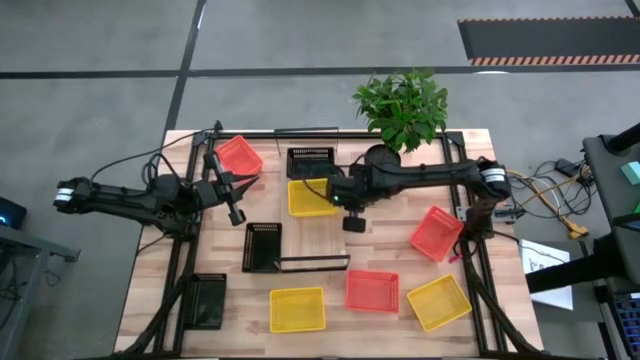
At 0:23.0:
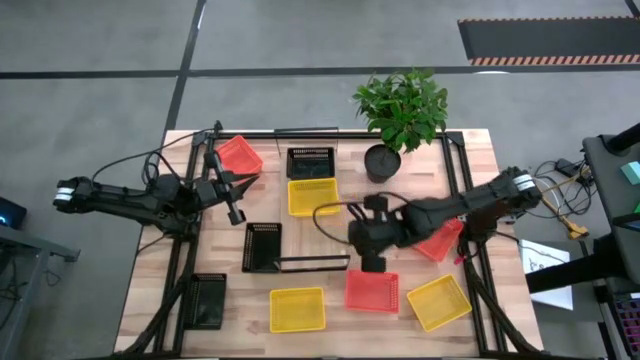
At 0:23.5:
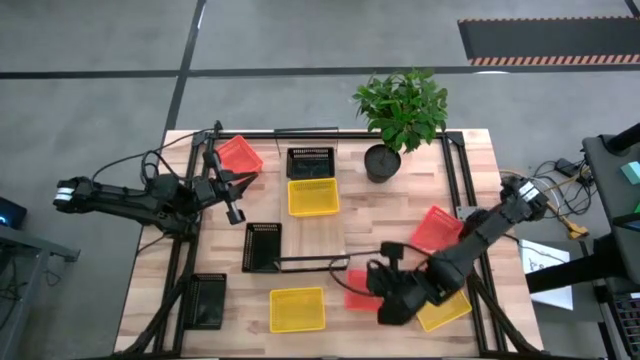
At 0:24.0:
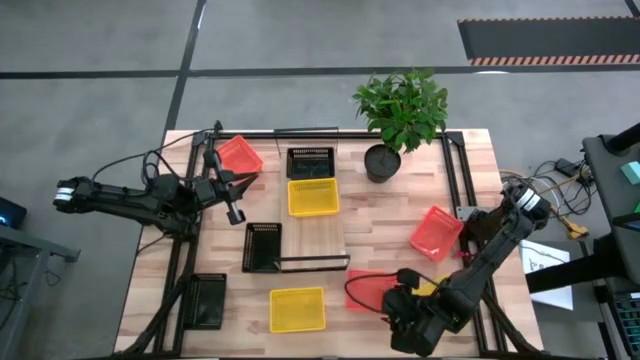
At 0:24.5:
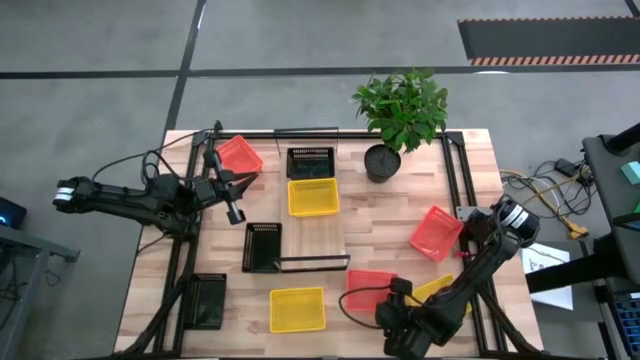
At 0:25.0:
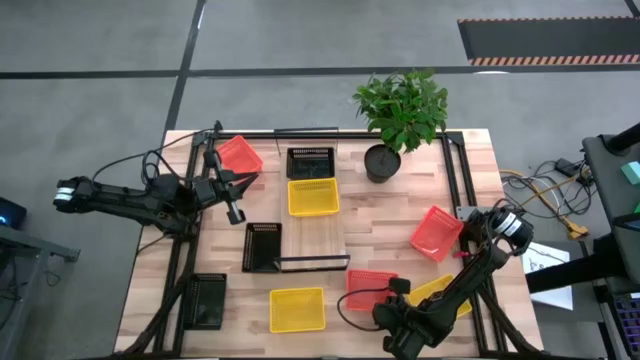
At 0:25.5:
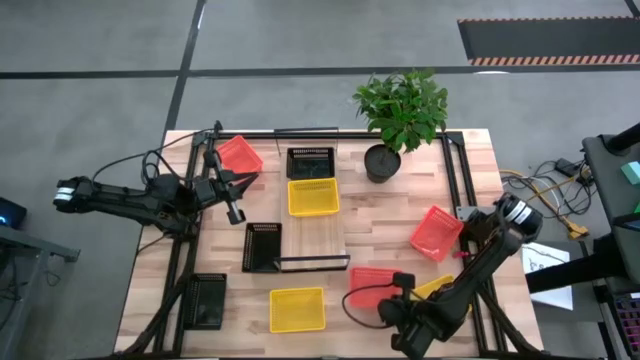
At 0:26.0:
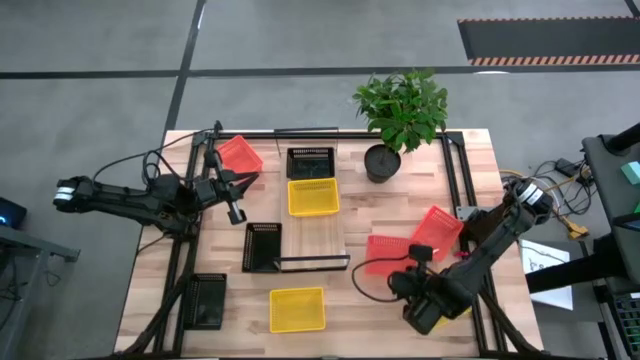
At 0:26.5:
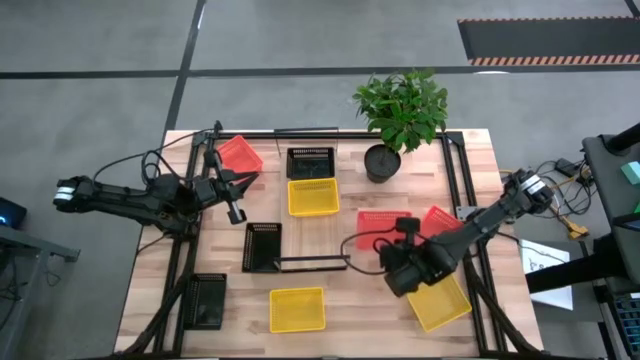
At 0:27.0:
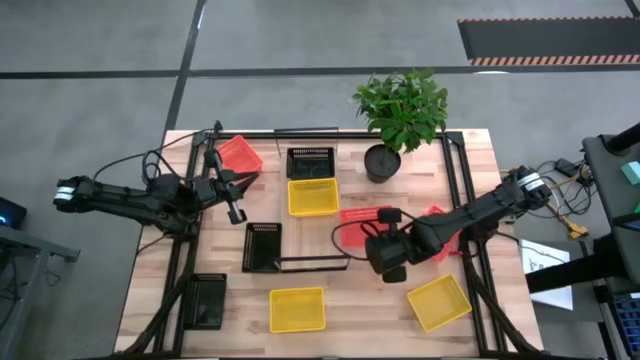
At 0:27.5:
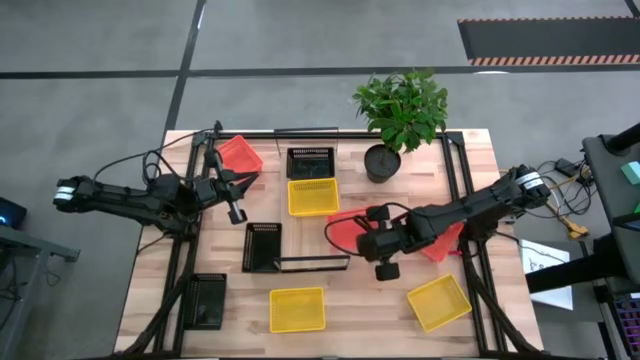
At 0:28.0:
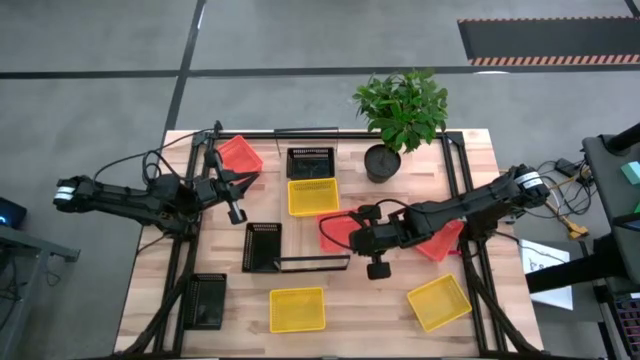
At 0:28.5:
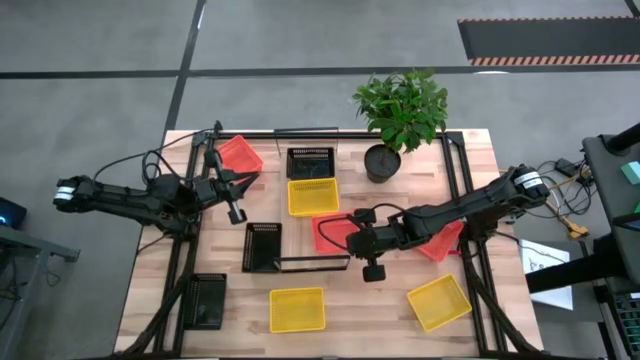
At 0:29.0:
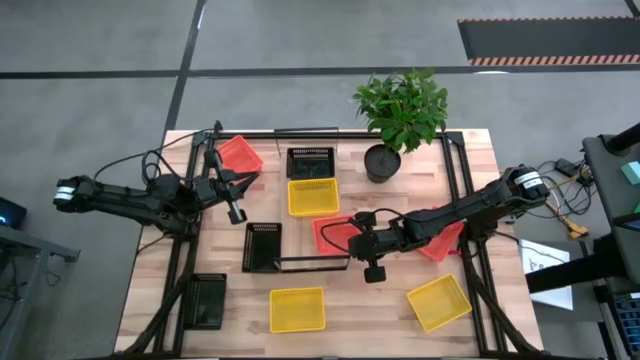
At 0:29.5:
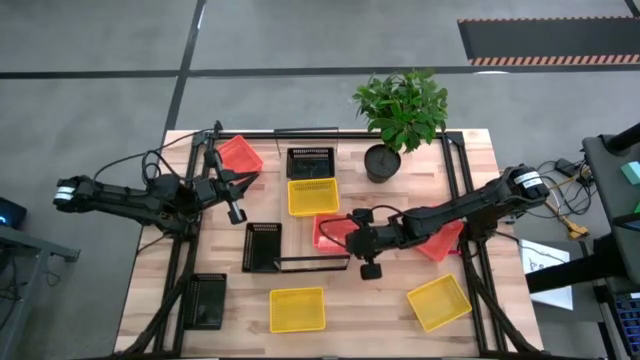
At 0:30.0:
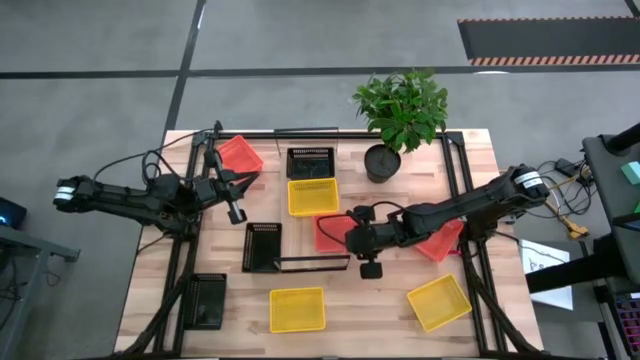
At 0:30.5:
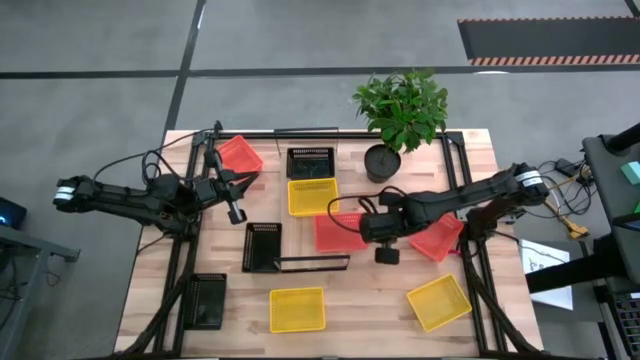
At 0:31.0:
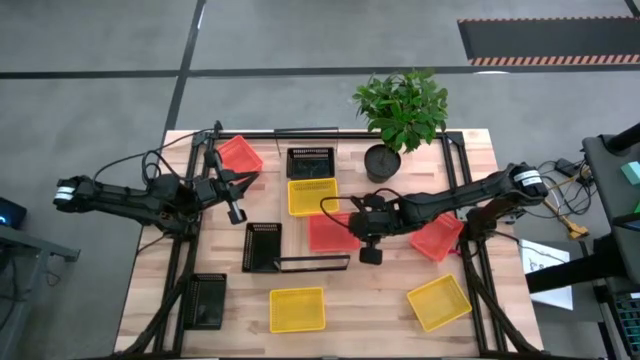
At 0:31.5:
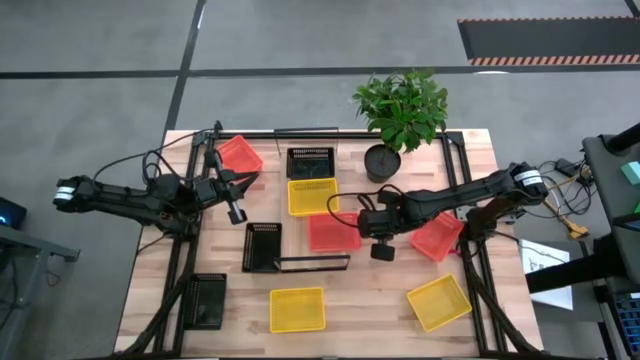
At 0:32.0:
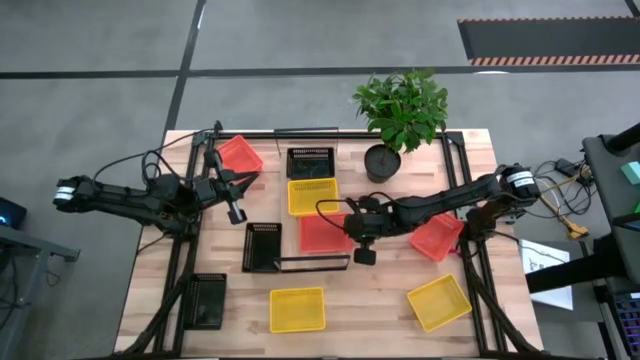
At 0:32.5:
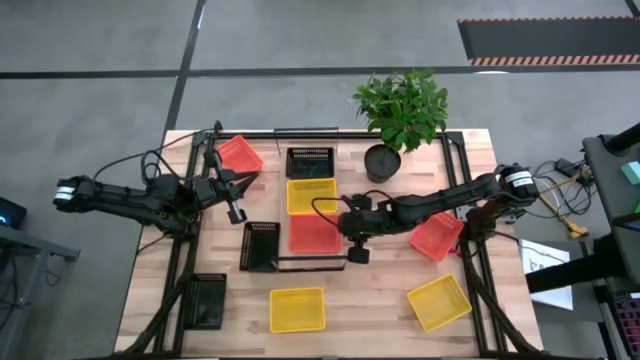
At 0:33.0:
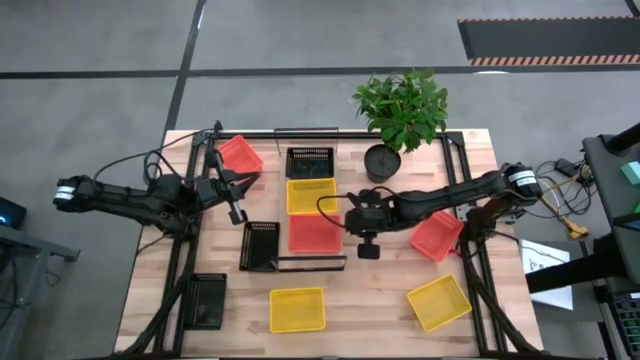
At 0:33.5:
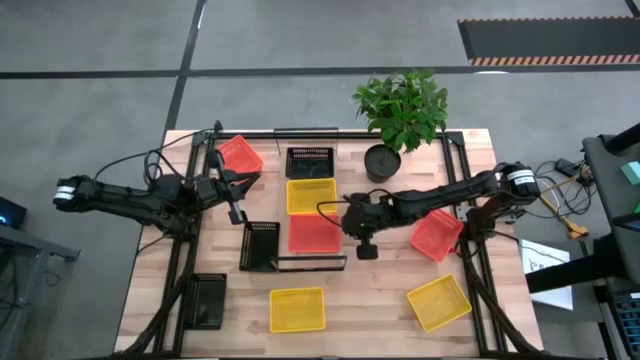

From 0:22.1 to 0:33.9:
Task: Stack baskets on shelf by color
Put the bottom orange bin on the shelf

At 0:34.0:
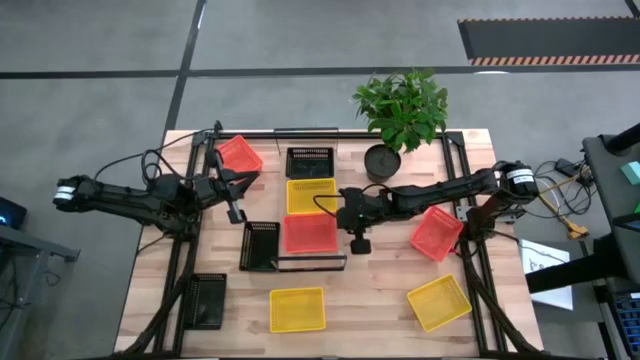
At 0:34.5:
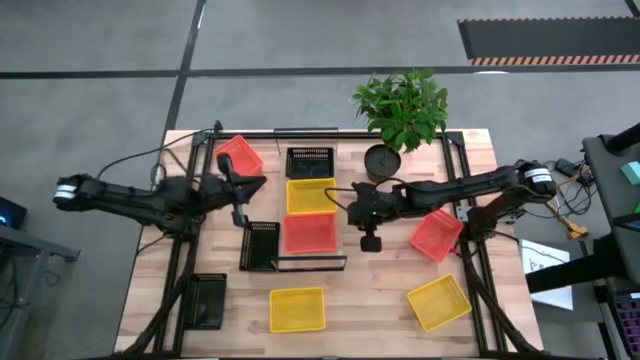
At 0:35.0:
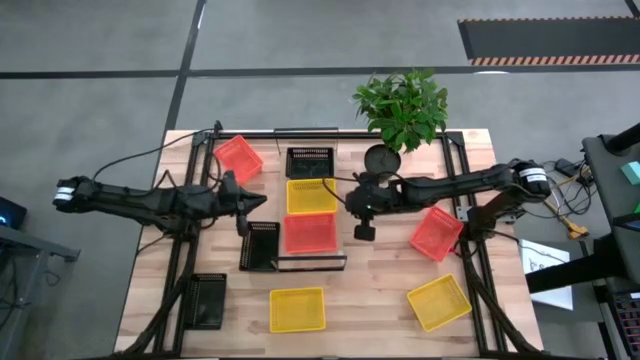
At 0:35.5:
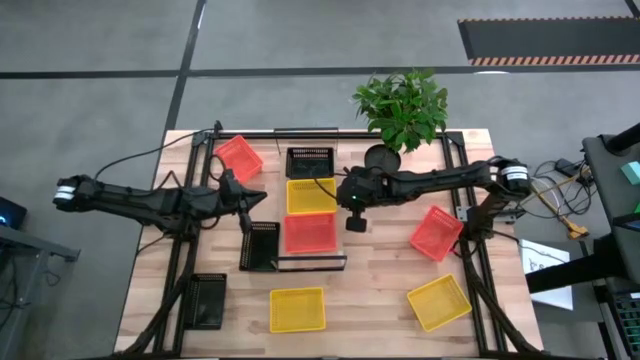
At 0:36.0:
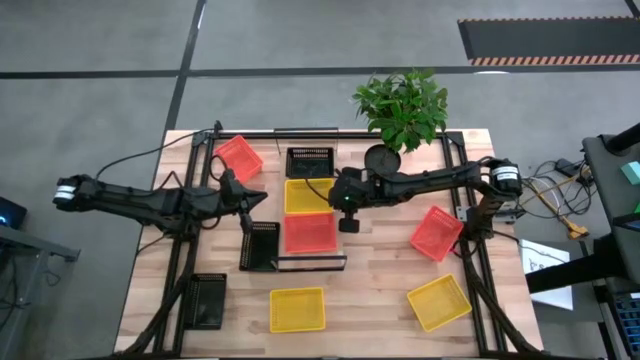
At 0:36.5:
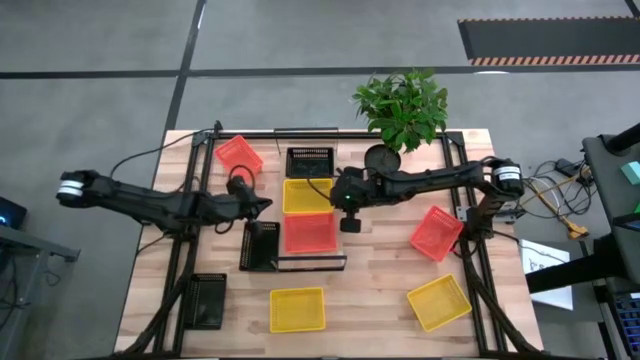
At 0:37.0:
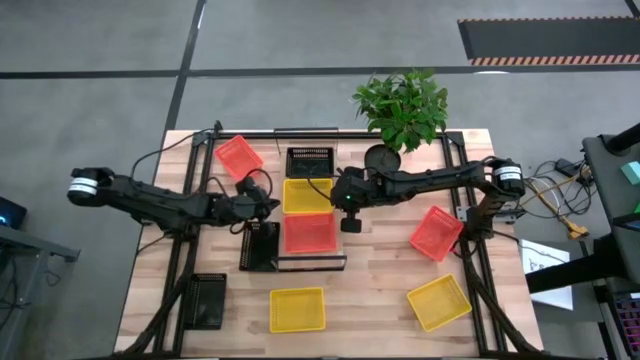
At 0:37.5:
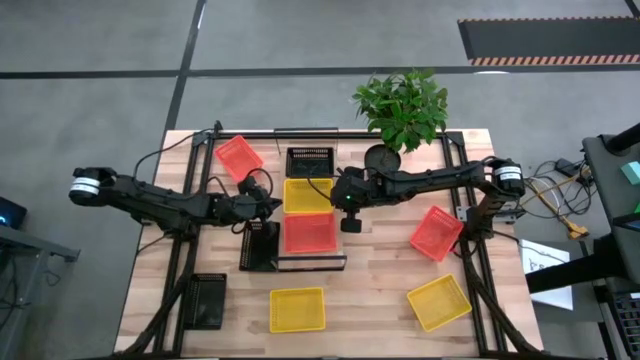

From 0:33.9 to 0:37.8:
Adjust the yellow bin on the shelf

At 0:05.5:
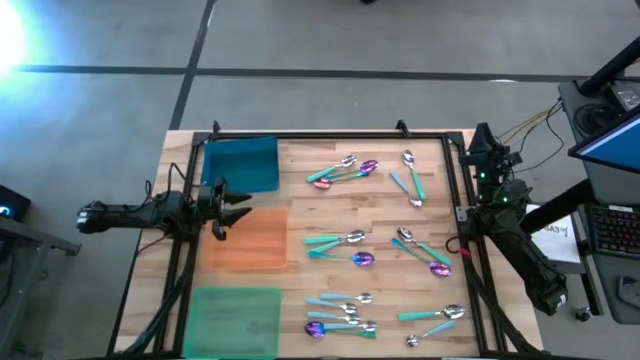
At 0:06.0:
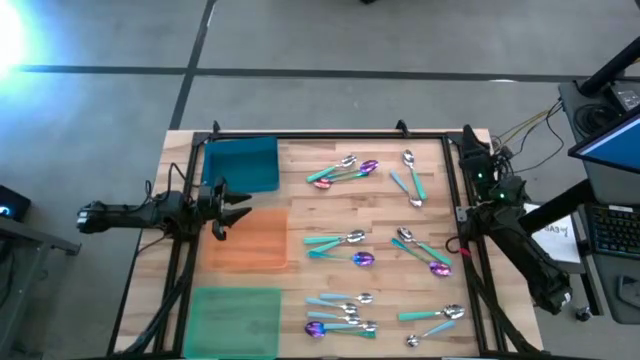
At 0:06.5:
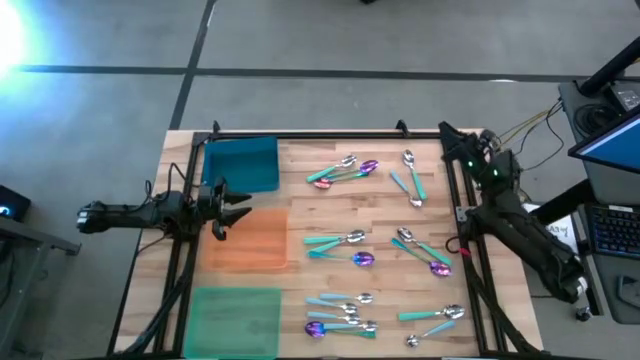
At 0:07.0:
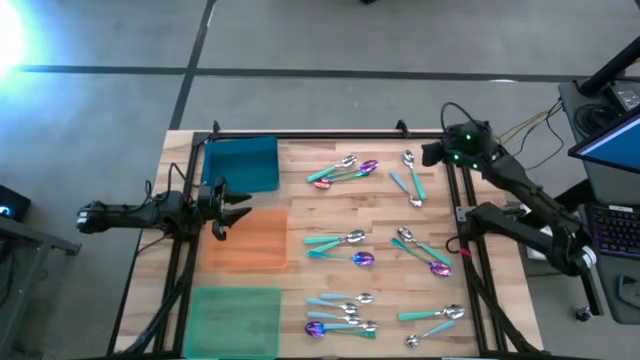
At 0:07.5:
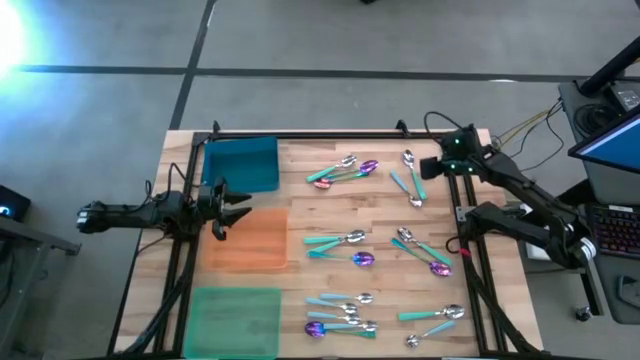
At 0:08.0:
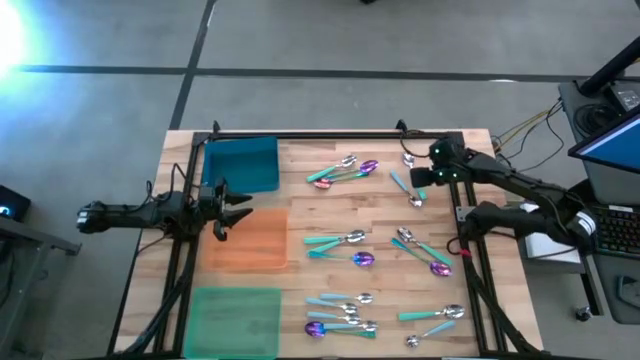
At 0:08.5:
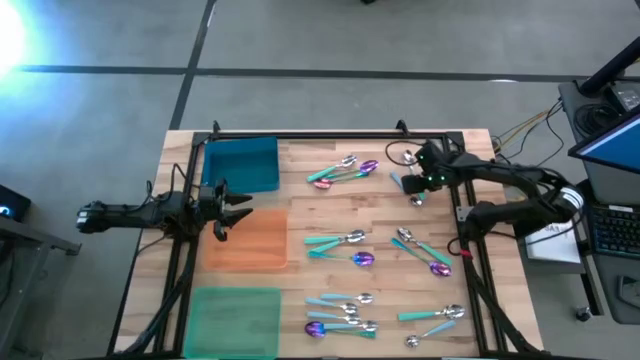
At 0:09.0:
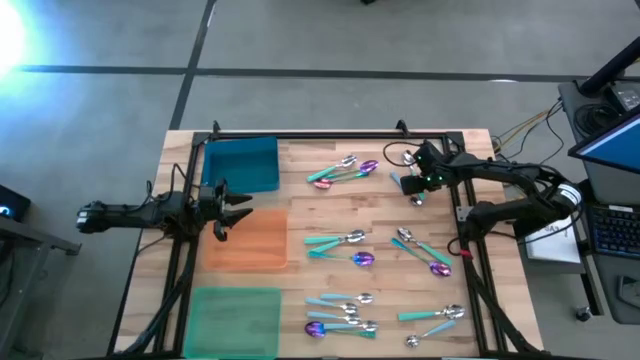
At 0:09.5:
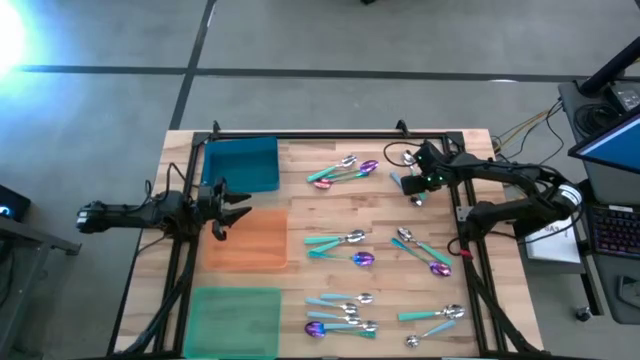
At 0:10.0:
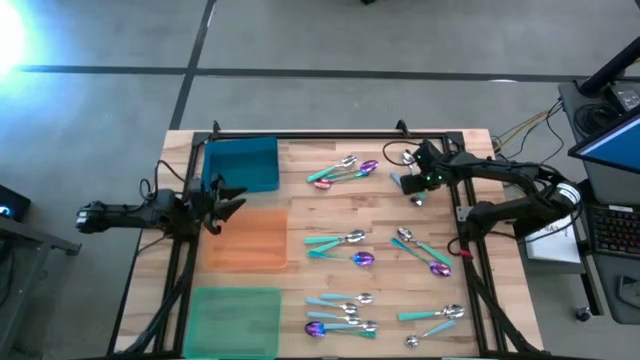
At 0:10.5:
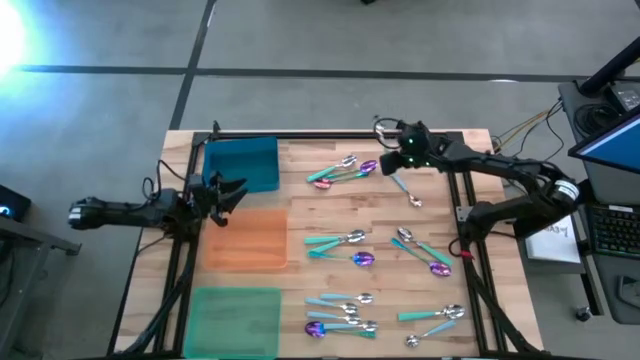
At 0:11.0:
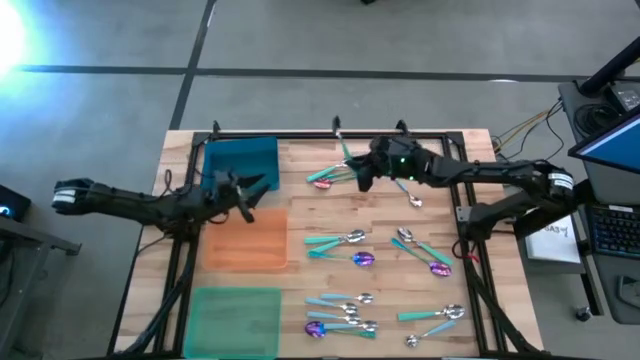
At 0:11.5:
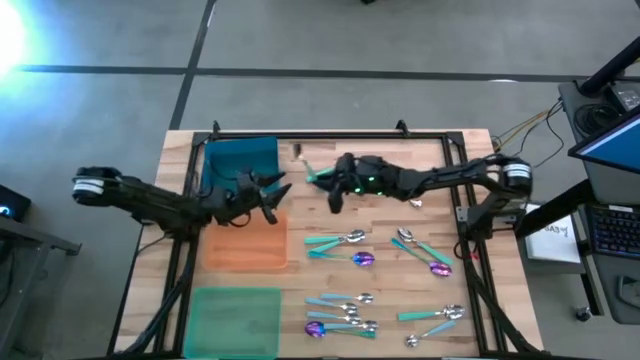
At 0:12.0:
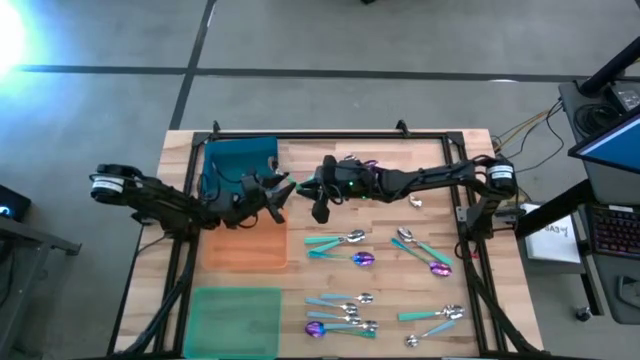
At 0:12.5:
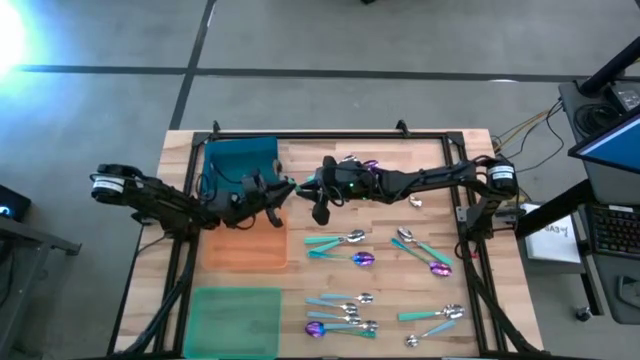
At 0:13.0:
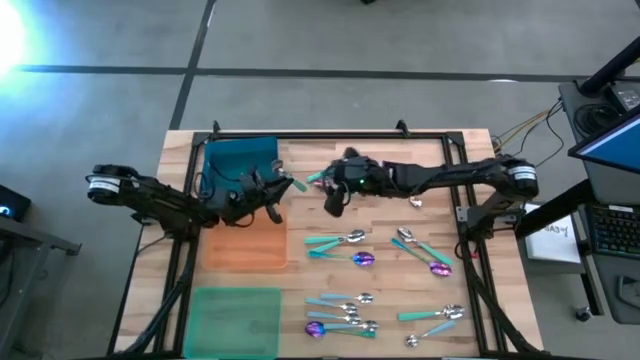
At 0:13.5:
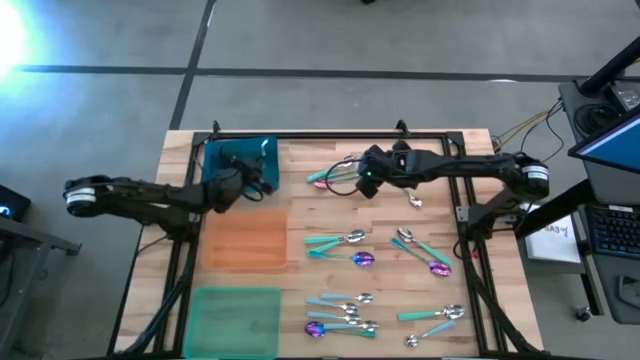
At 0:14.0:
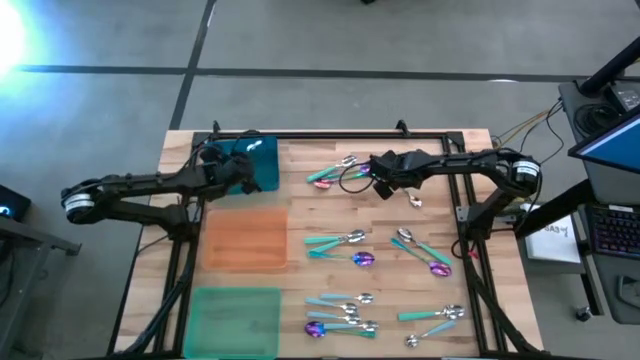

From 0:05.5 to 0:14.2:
Task: Sort silverware by color (type)
Put the green spoon into the blue bin
